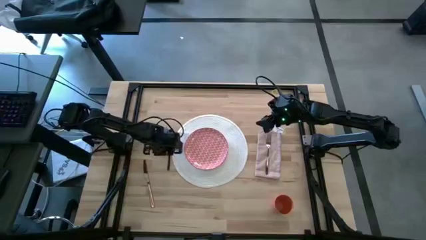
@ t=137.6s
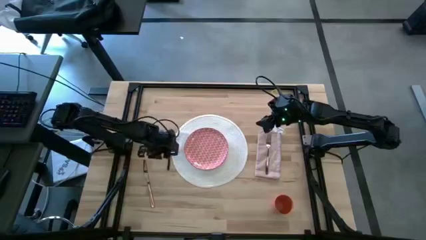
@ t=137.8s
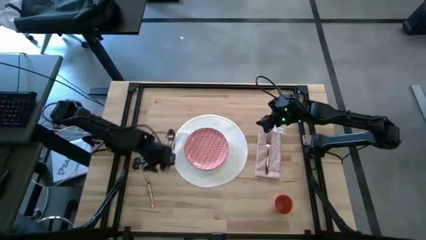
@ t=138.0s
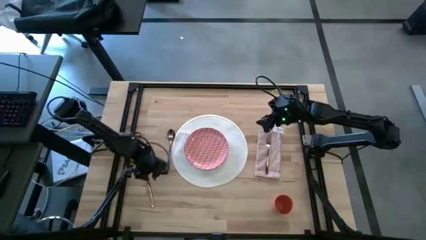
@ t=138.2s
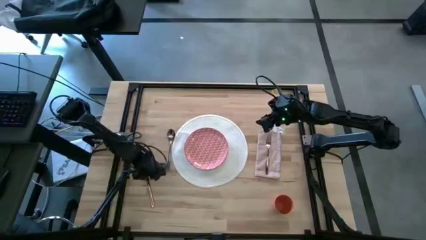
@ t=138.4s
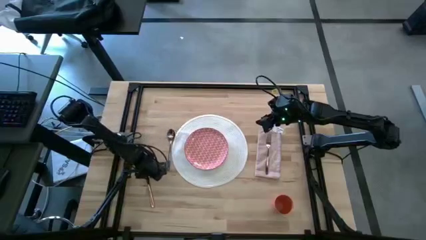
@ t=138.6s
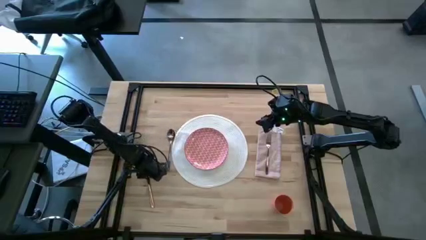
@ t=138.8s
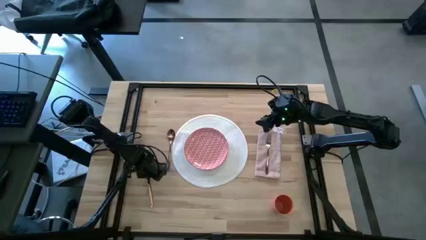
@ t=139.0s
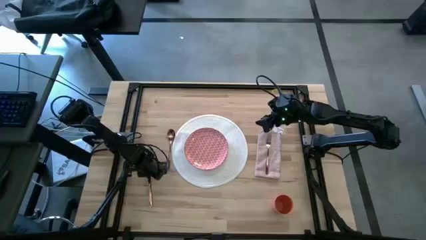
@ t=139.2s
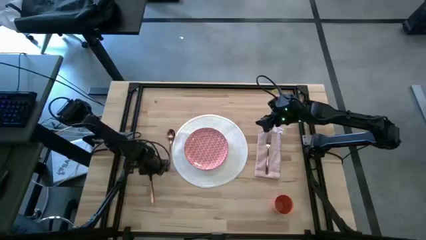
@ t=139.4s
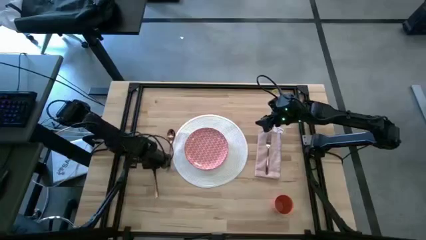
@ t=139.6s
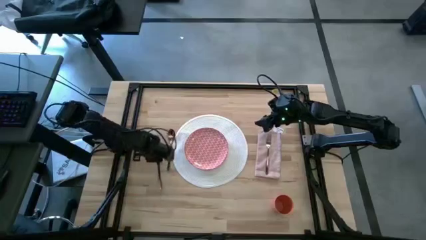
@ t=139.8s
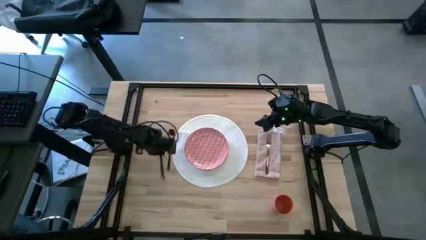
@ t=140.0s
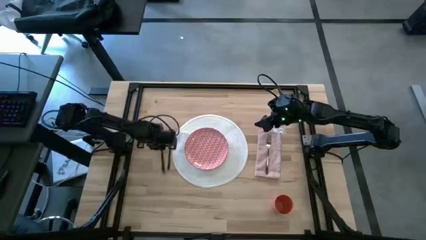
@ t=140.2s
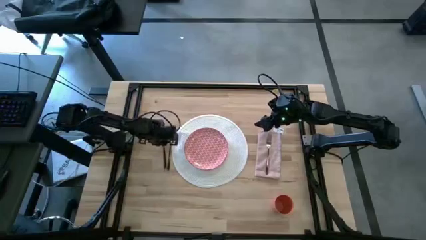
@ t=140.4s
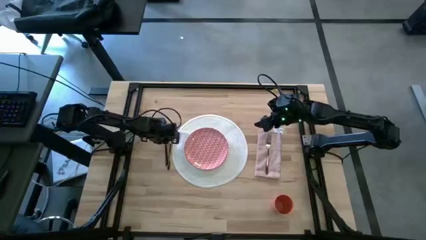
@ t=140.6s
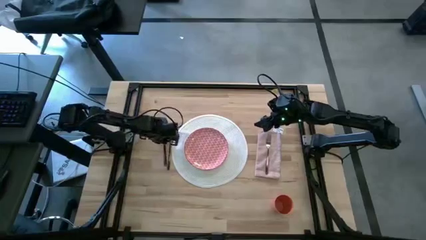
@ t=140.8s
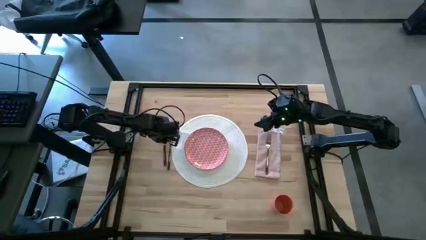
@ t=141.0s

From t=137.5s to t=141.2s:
Task: Set table place
Put the knife to the left of the spoon

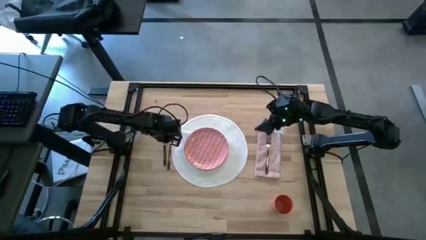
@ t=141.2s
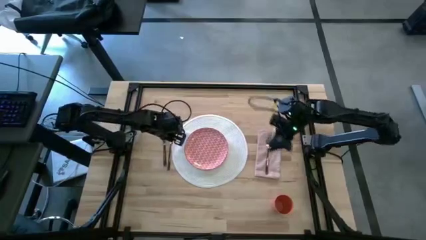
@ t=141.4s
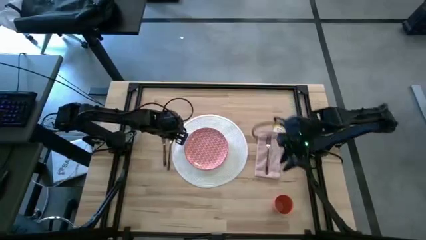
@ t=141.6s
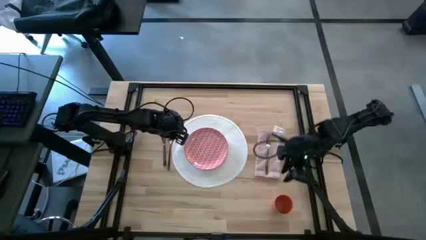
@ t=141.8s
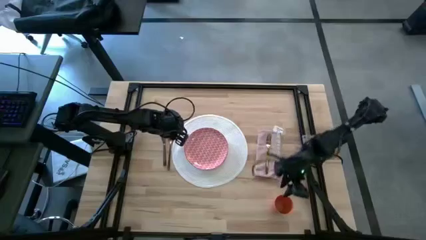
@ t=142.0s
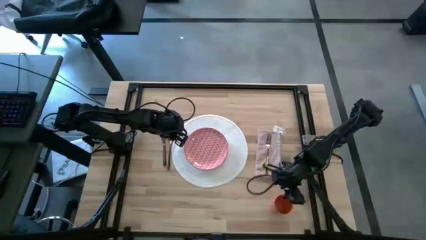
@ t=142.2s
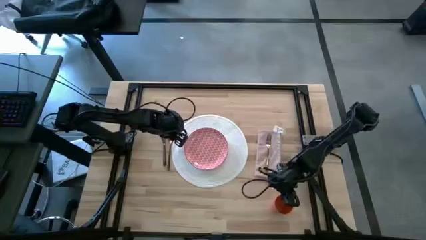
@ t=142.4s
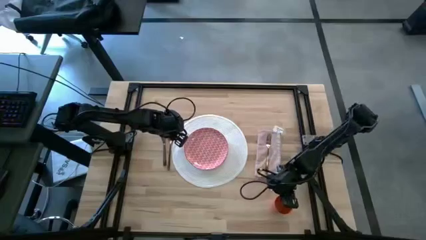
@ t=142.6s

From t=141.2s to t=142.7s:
Put the orange cup to the top right of the white mat

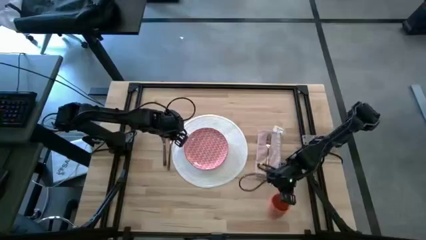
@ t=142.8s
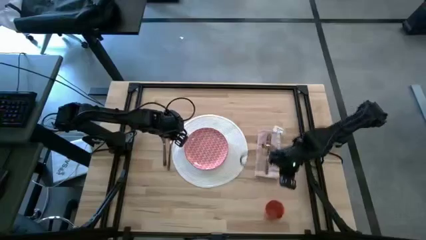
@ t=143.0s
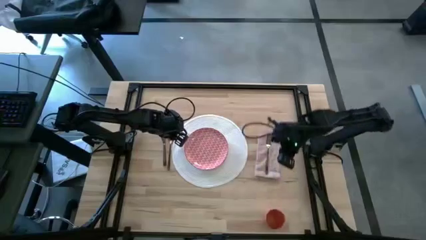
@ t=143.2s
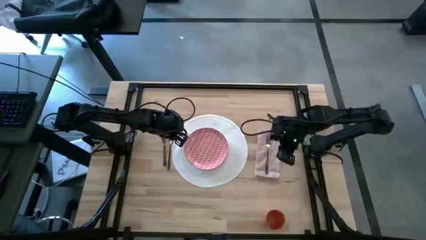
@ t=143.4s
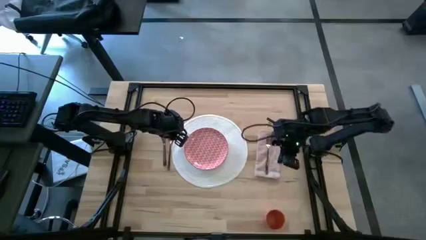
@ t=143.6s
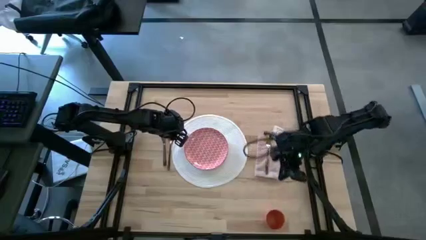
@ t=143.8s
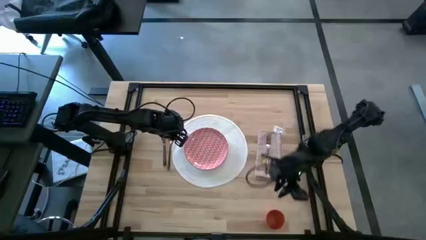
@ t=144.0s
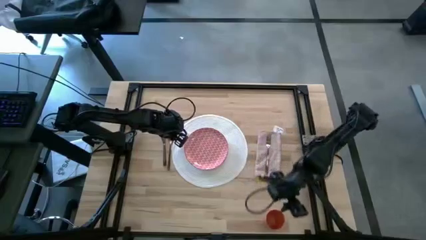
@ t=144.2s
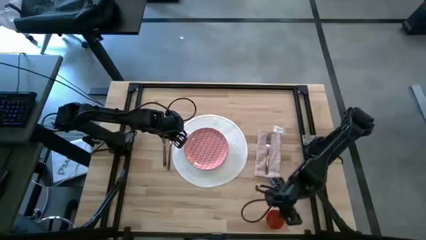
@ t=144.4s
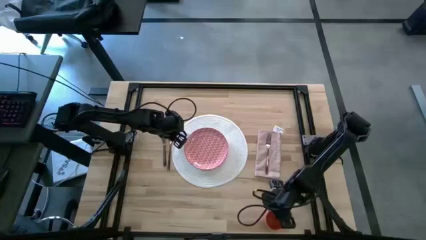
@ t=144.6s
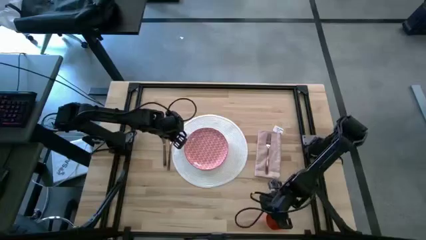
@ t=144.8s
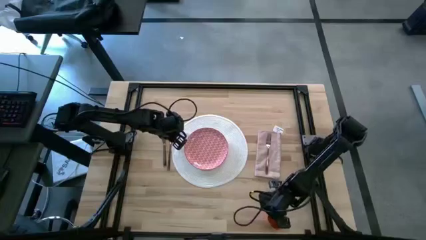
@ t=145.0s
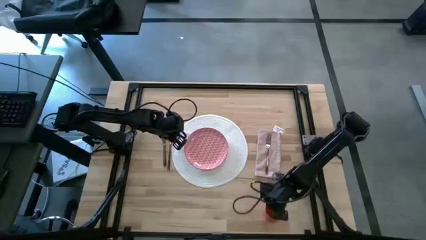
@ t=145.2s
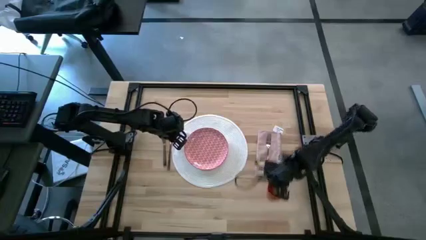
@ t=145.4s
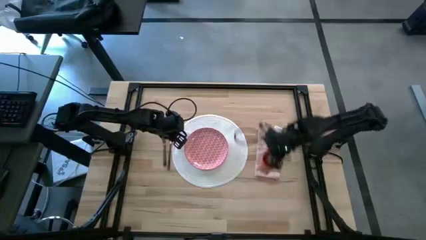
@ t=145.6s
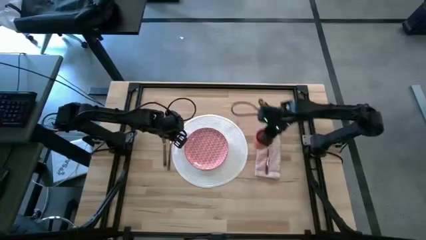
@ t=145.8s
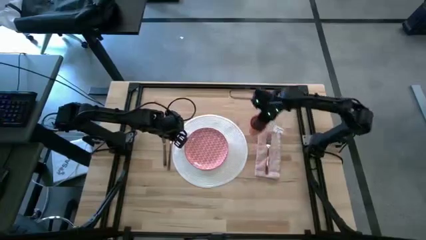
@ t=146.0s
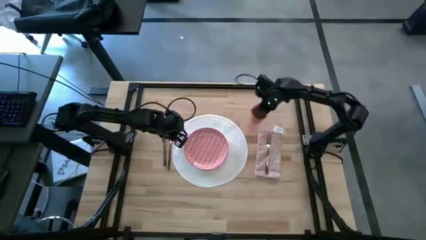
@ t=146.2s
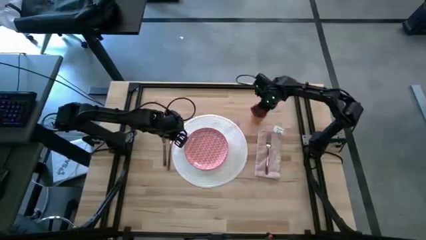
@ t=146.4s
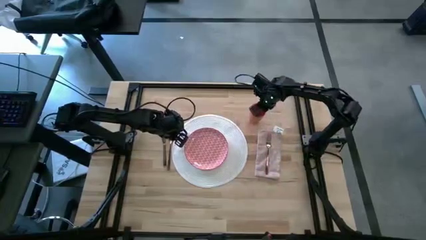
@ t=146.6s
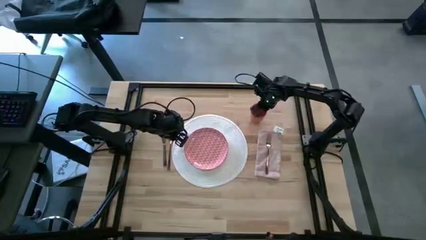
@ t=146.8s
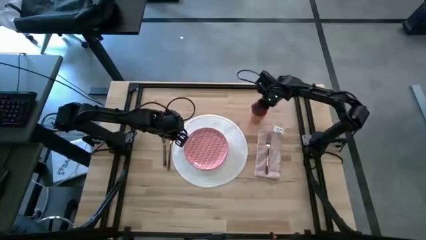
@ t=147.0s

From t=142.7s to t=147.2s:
Put the orange cup to the top right of the white mat

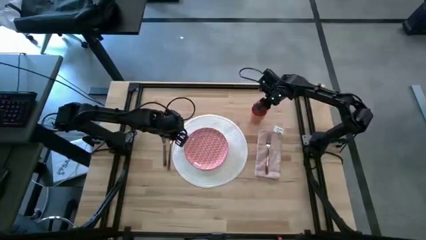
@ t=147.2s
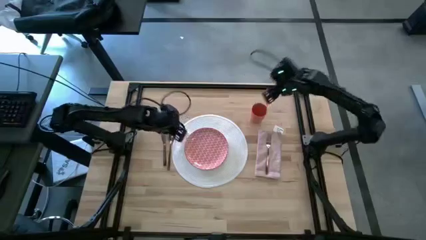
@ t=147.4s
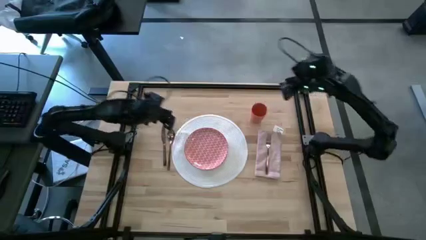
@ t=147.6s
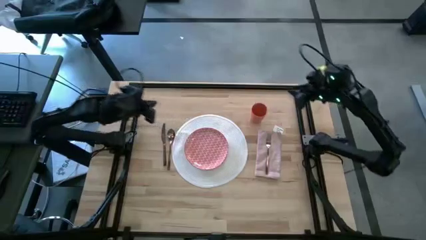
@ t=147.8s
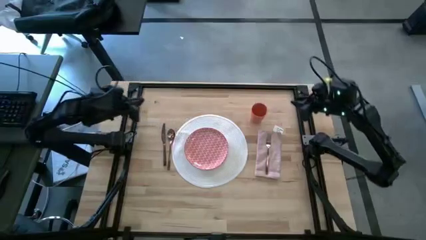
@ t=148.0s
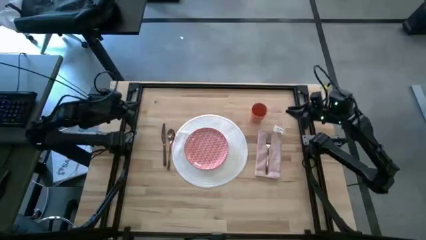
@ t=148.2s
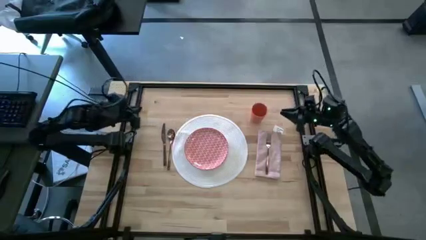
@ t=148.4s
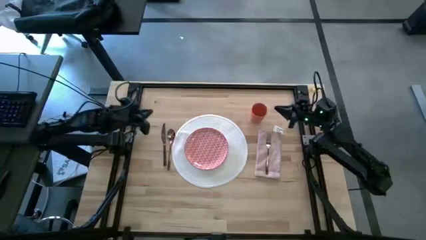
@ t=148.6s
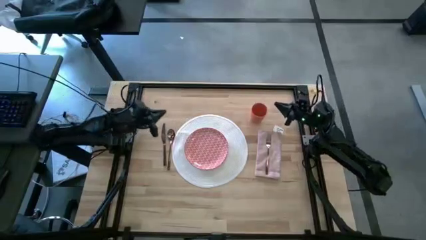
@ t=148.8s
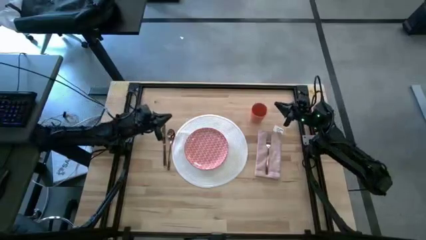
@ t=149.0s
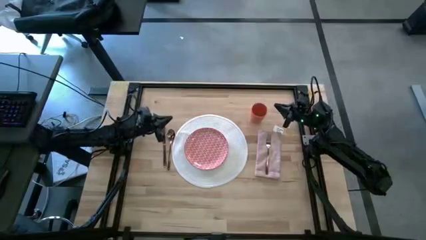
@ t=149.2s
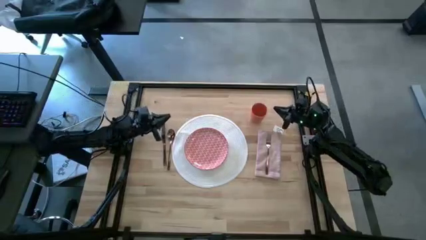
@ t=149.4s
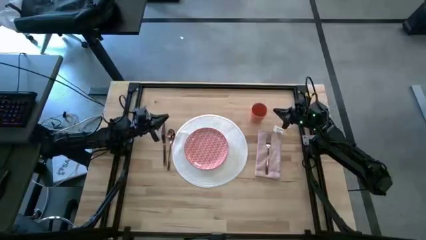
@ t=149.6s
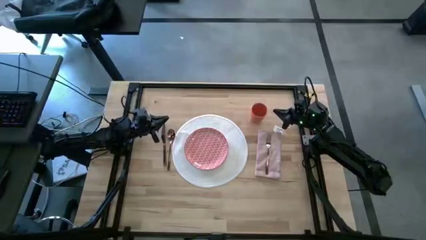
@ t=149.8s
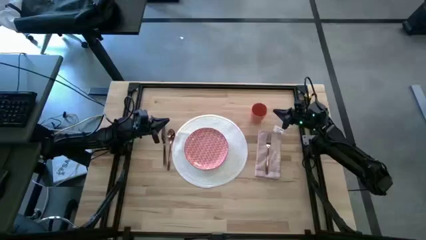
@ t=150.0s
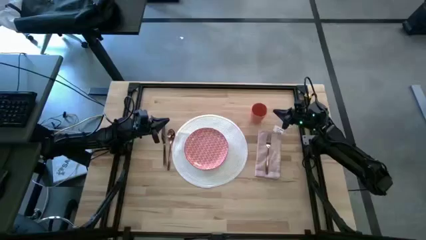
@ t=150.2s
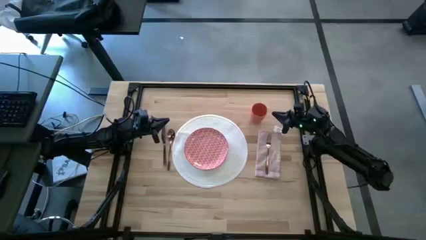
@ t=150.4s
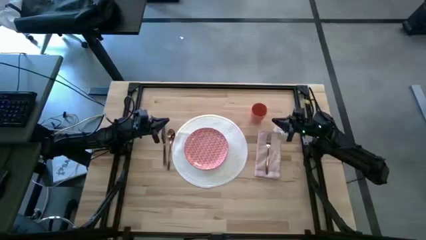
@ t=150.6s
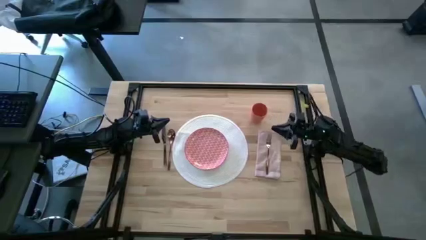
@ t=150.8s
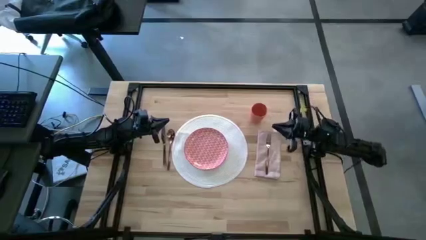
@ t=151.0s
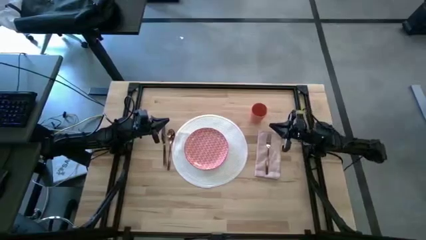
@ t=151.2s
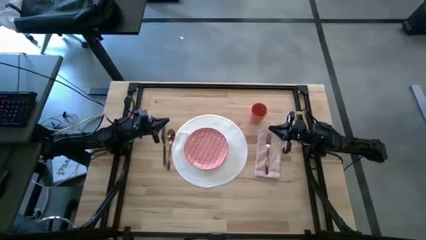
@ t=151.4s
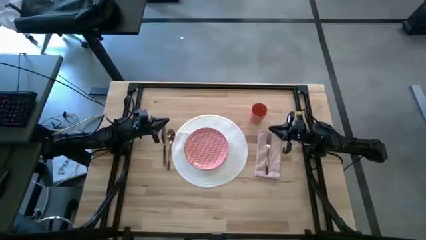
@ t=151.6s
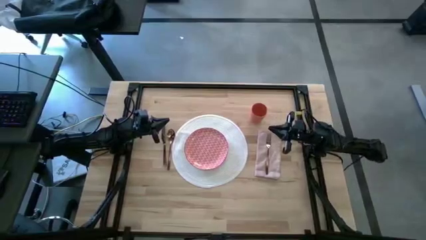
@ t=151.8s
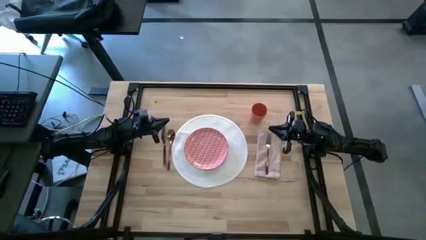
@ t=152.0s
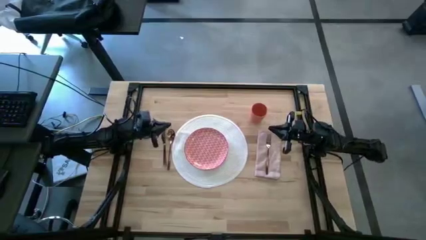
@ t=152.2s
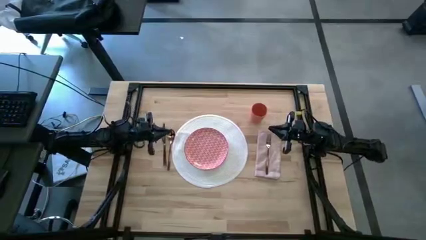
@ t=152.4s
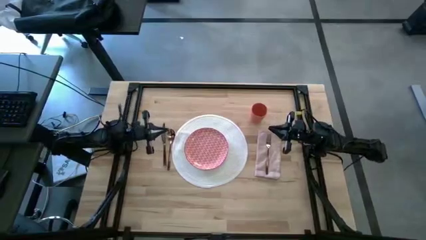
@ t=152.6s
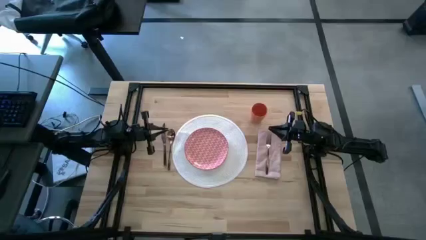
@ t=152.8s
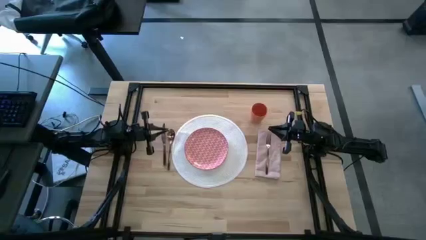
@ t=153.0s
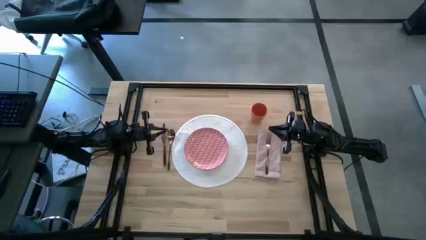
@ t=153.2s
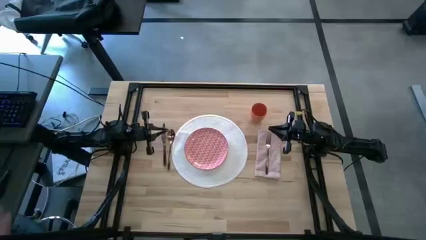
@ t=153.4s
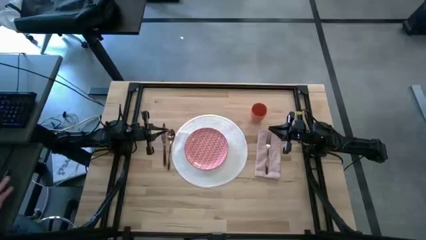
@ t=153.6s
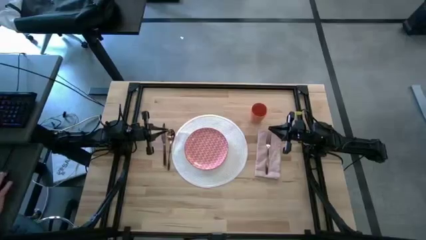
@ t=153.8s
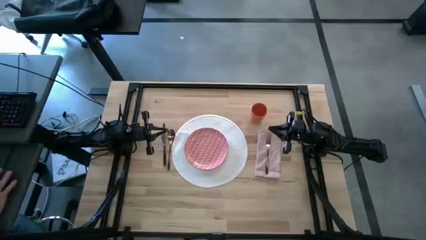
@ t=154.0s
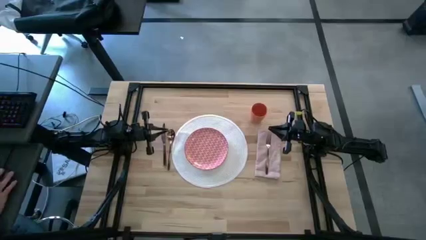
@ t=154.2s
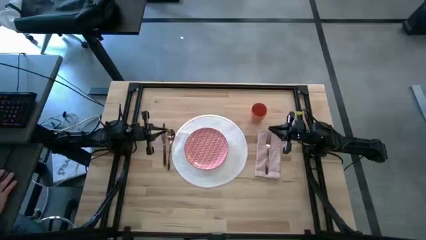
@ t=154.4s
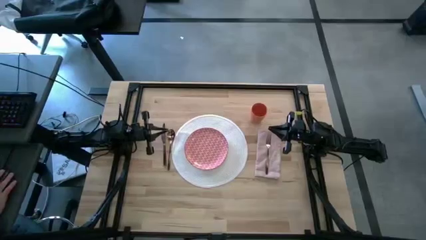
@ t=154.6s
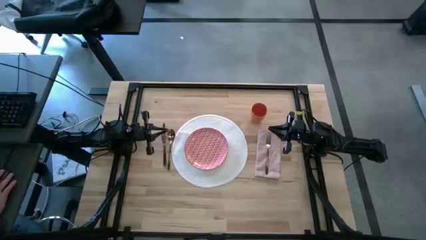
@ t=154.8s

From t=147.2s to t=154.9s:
Return to Home Position
